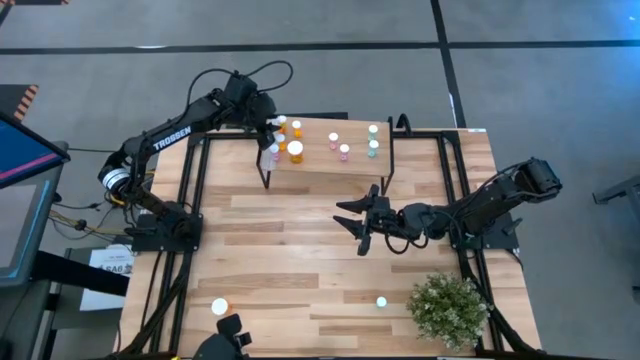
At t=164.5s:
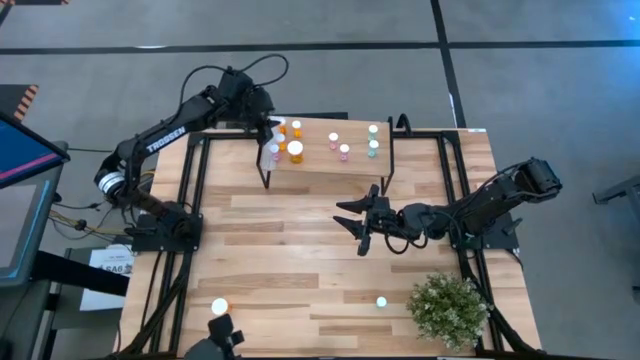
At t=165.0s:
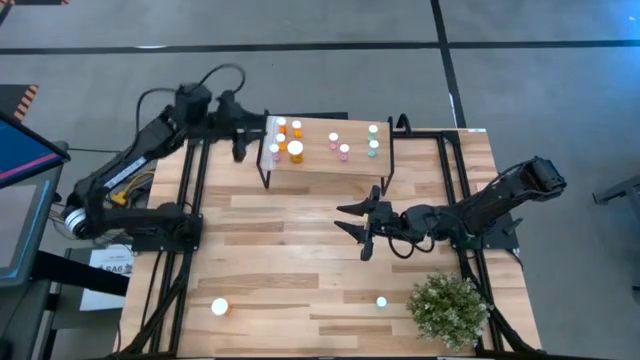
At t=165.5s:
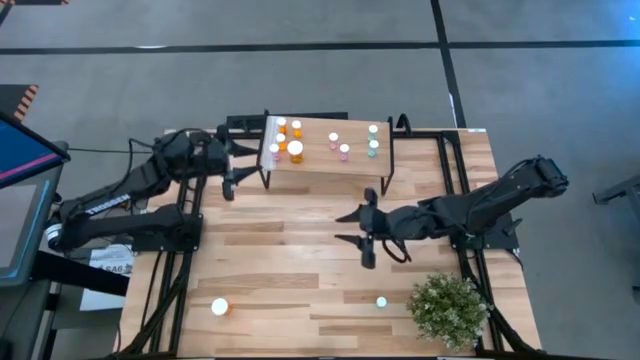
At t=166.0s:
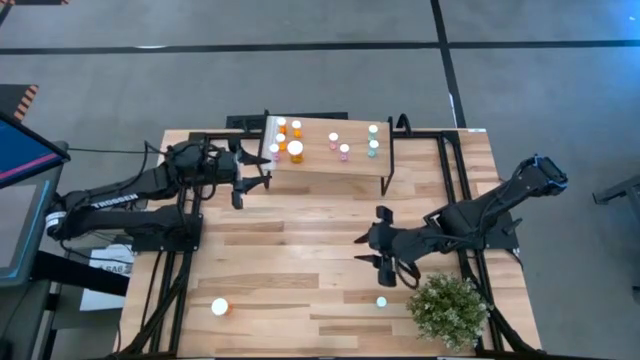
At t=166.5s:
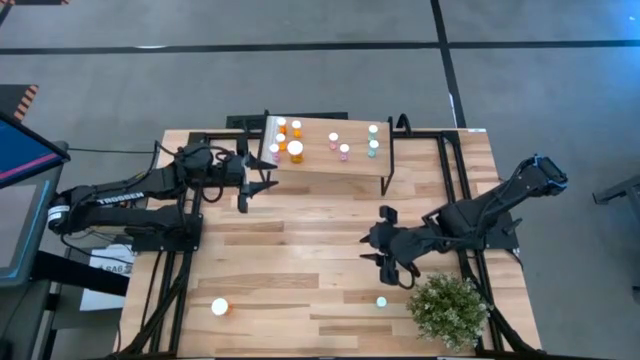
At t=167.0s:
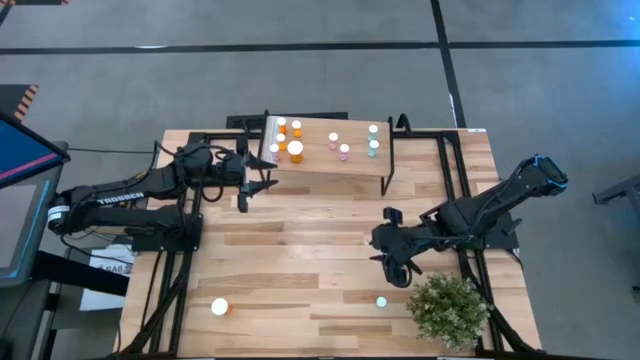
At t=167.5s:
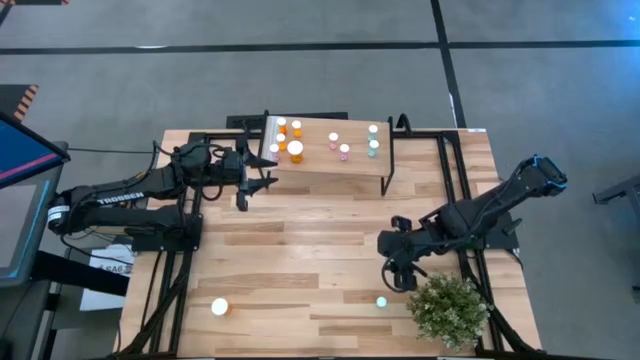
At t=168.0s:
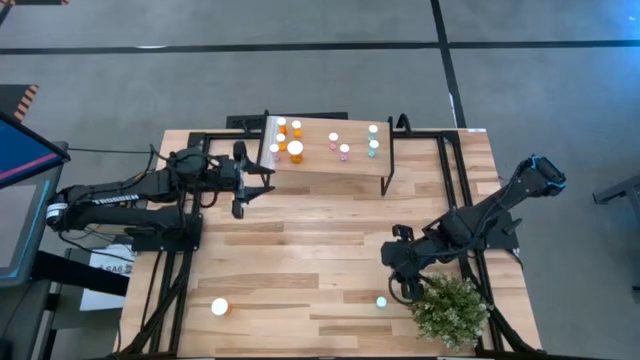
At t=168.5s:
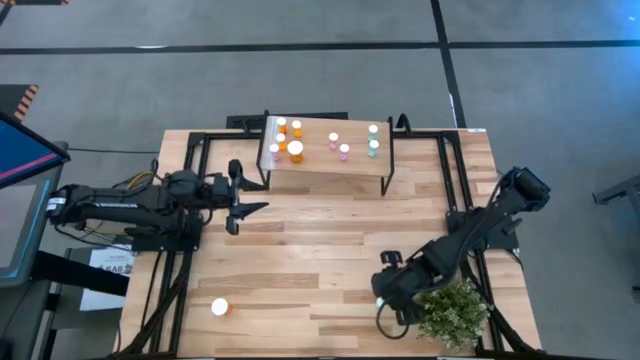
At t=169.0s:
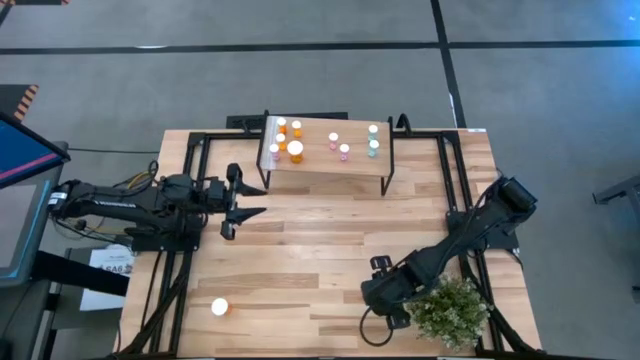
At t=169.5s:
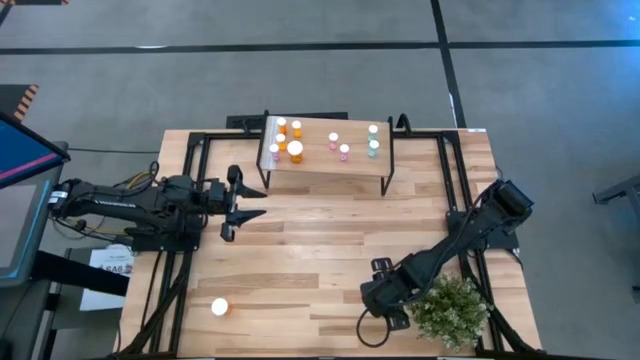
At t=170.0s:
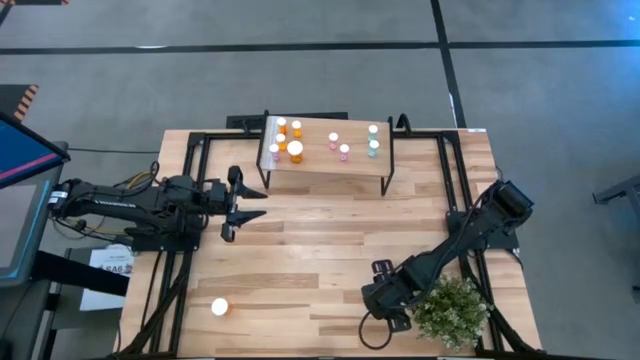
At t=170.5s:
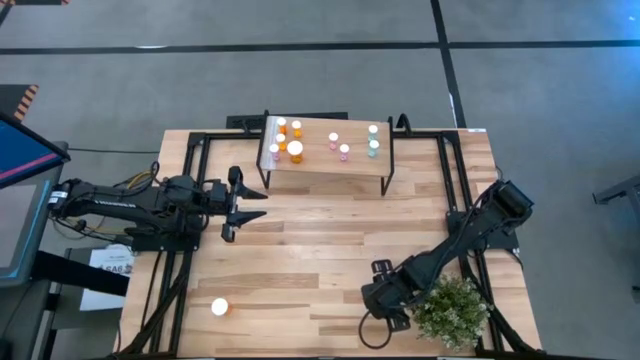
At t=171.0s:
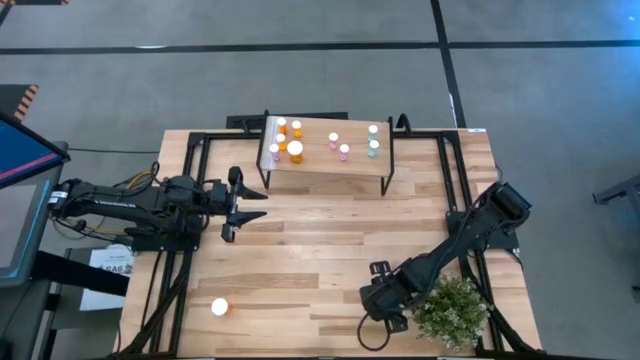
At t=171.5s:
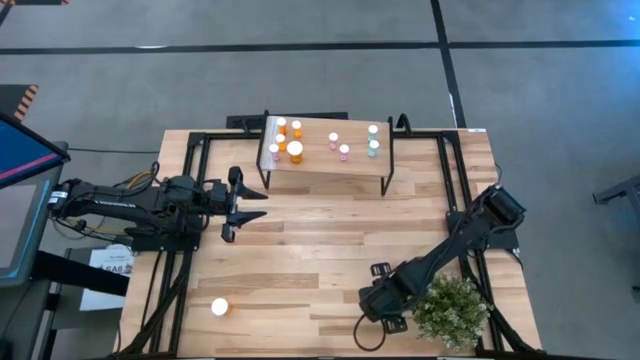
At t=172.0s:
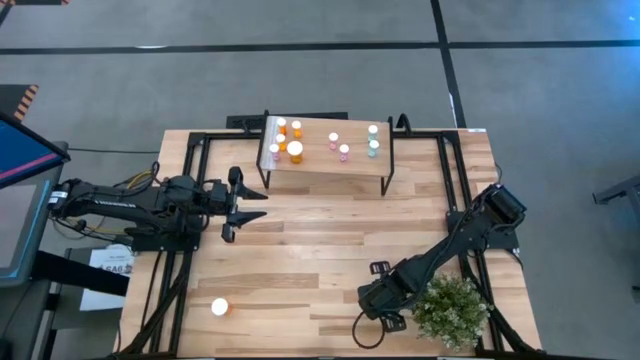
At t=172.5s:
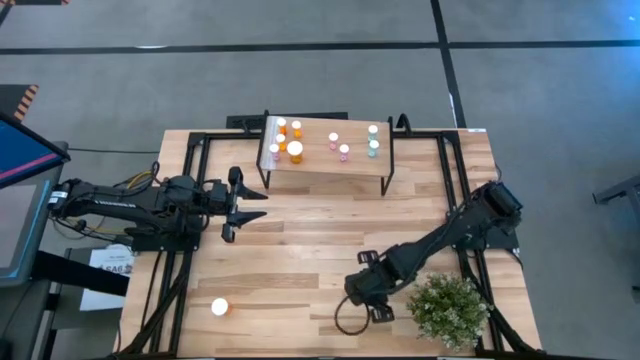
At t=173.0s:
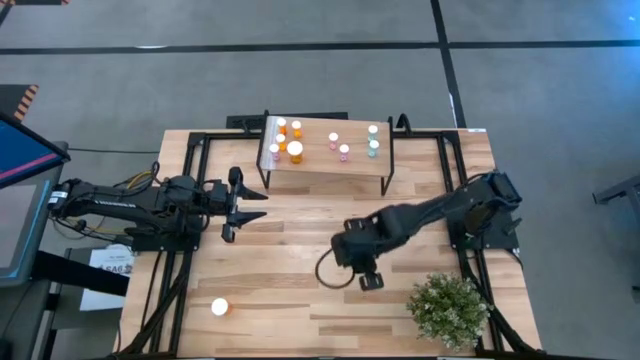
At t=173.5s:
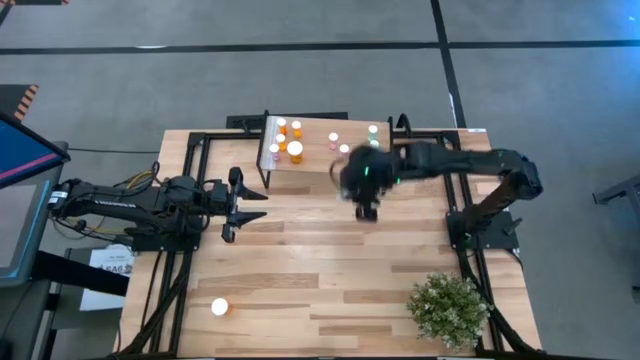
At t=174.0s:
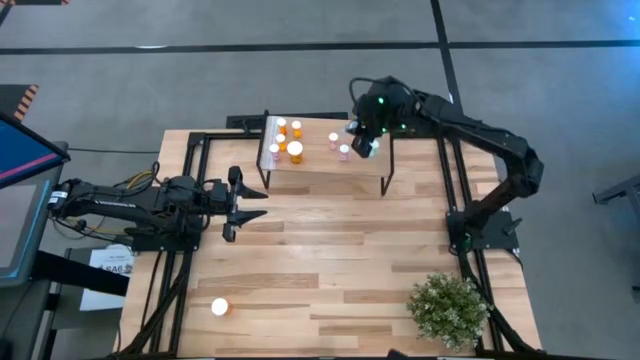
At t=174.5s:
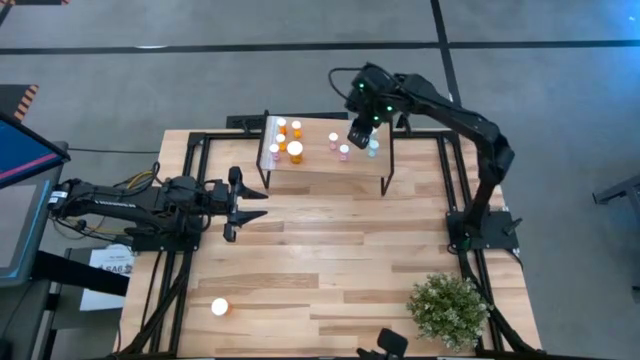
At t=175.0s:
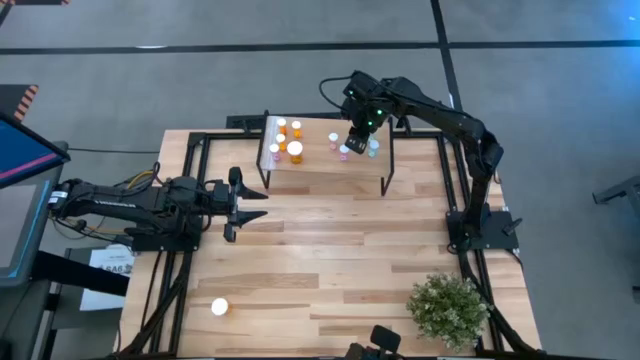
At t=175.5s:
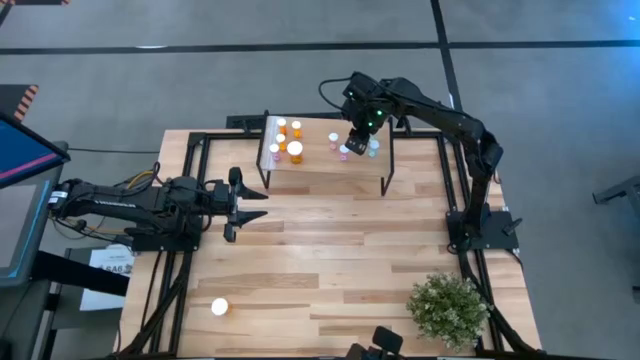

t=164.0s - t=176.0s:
Task: Pick and place medicine bottles onto shelf by color
Put the blue pill bottle on the shelf
